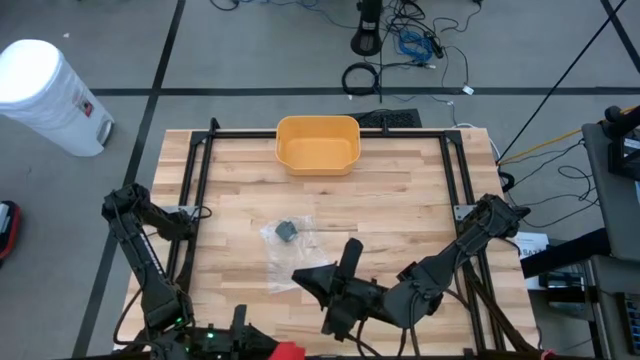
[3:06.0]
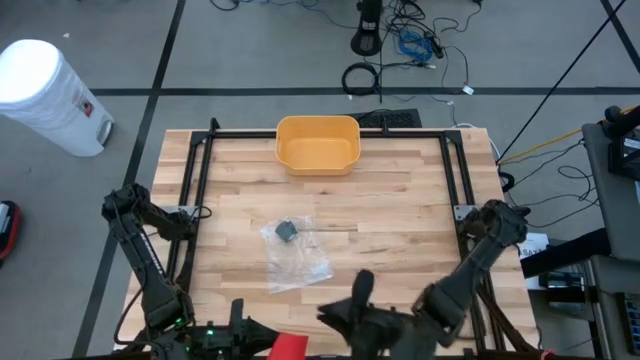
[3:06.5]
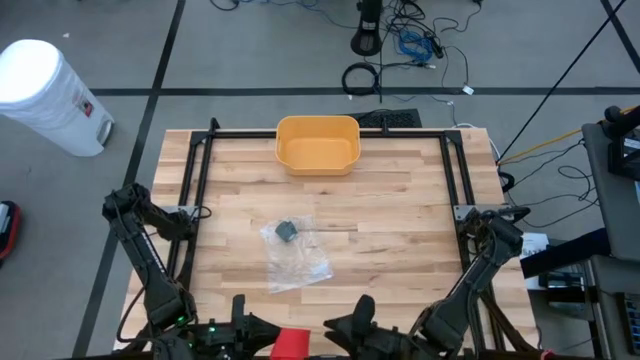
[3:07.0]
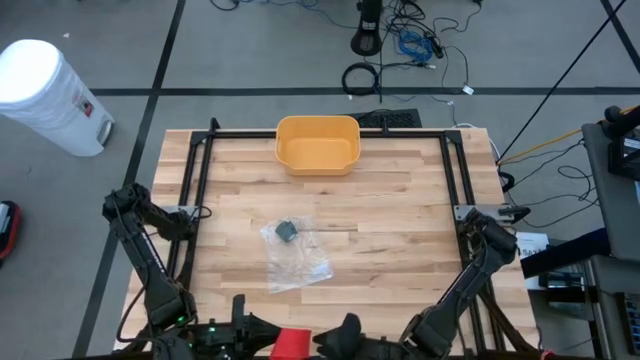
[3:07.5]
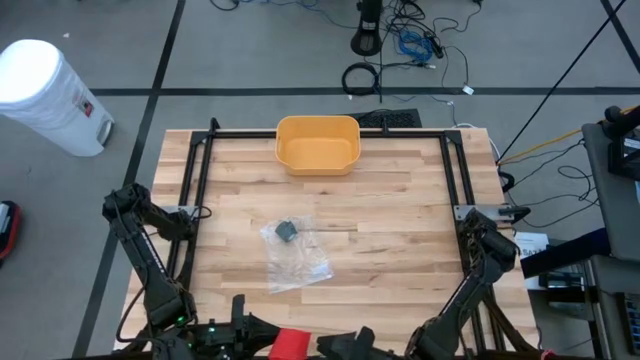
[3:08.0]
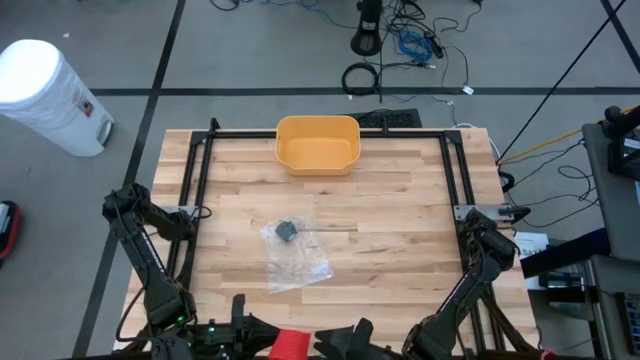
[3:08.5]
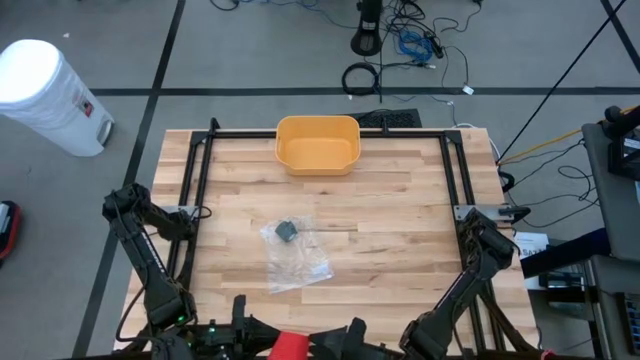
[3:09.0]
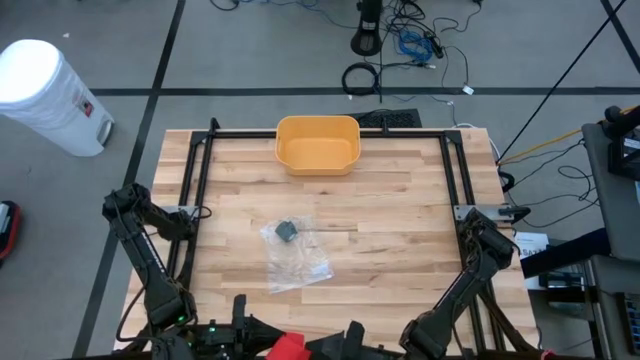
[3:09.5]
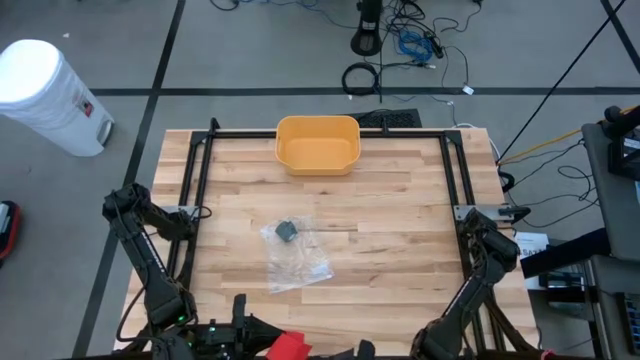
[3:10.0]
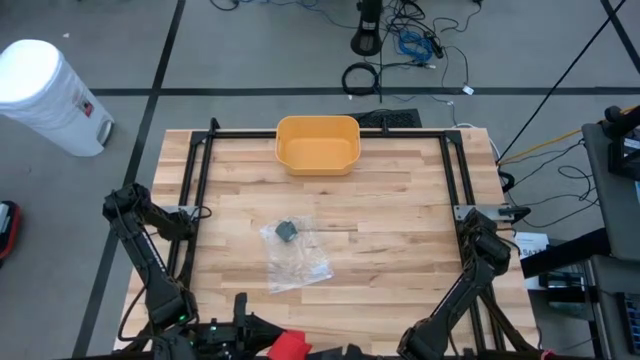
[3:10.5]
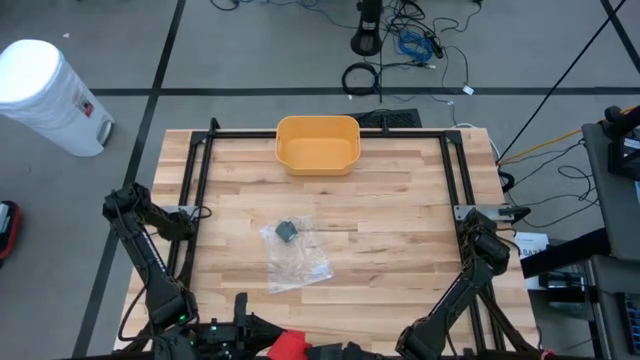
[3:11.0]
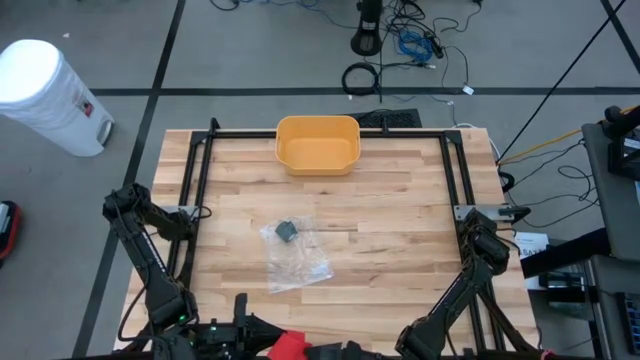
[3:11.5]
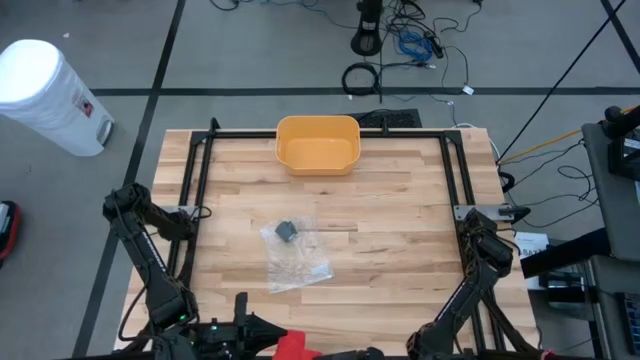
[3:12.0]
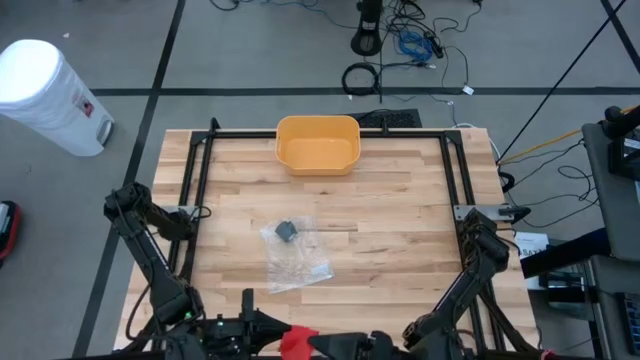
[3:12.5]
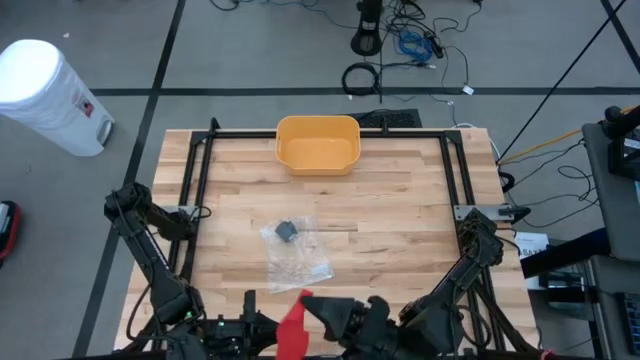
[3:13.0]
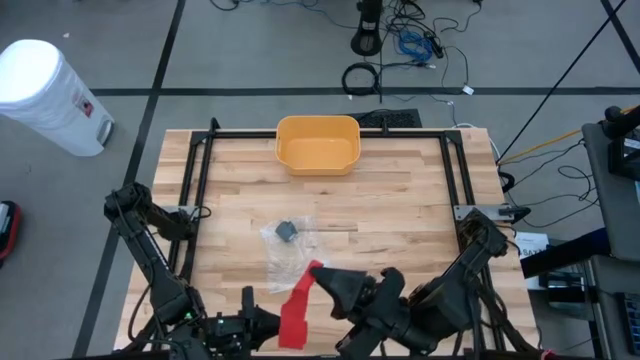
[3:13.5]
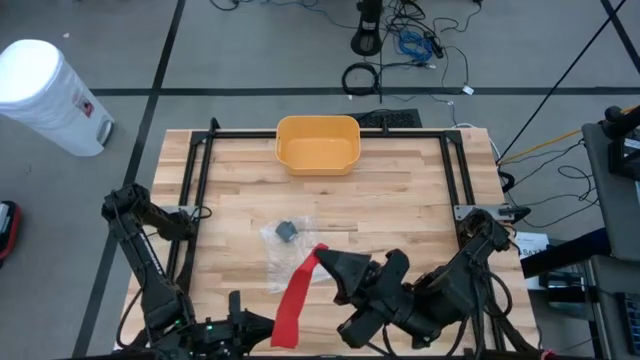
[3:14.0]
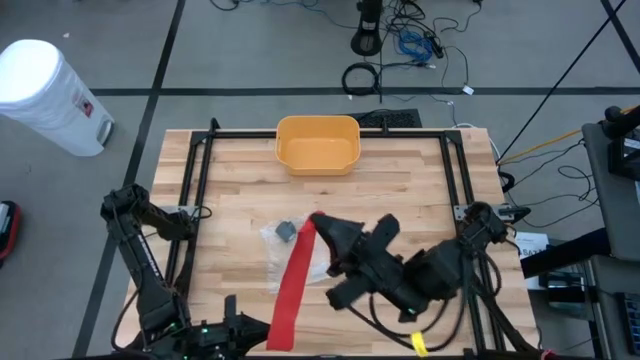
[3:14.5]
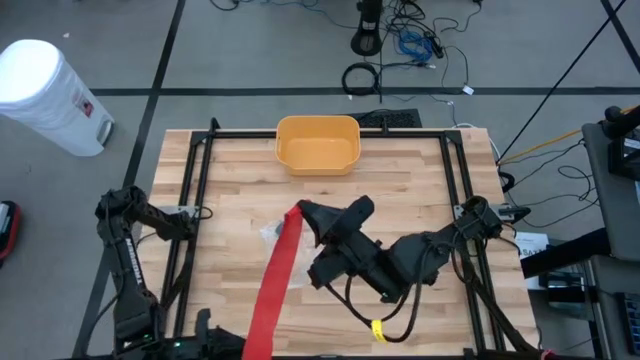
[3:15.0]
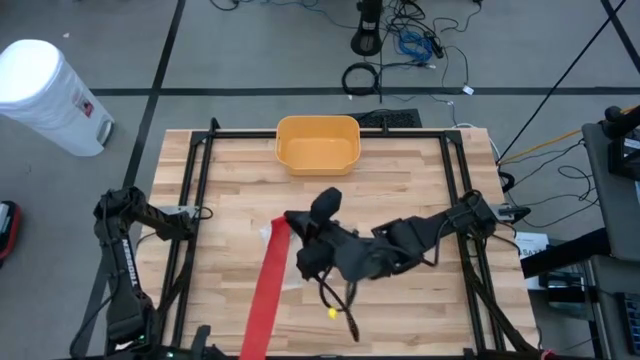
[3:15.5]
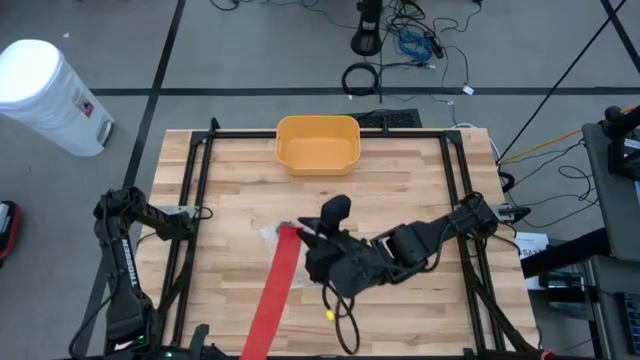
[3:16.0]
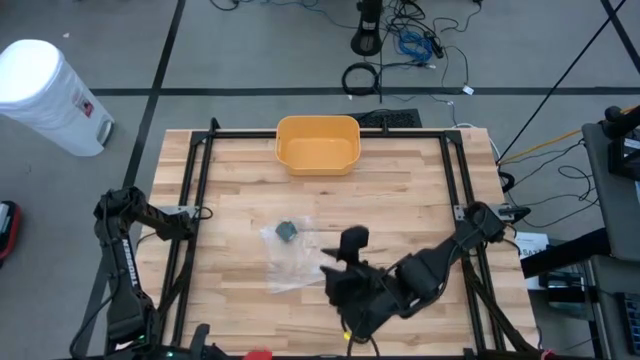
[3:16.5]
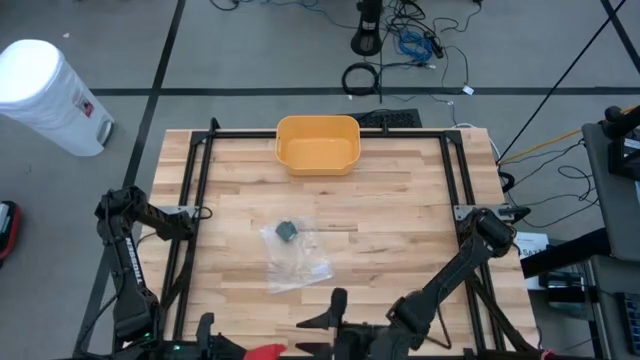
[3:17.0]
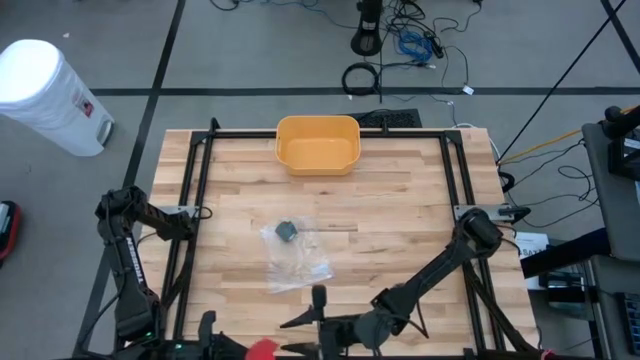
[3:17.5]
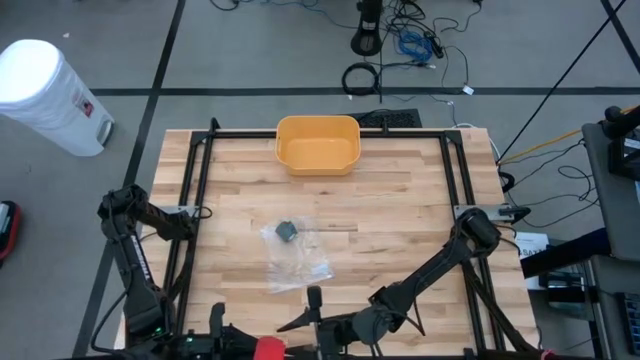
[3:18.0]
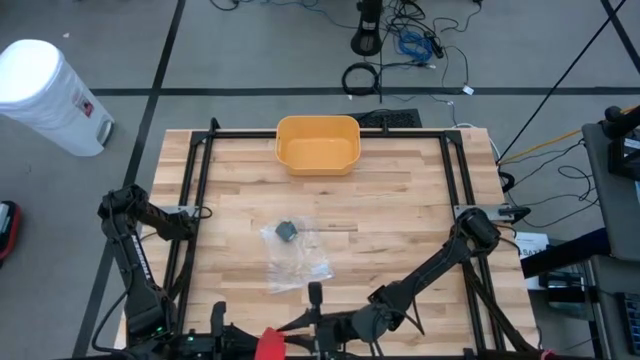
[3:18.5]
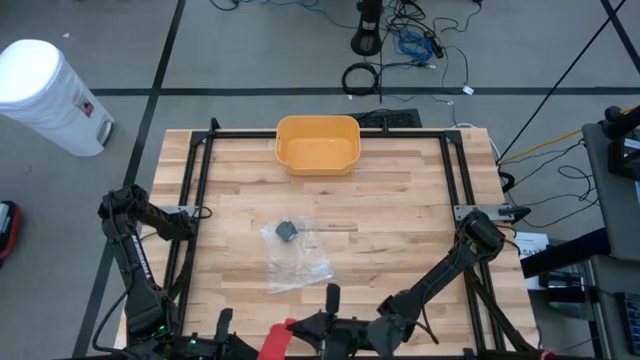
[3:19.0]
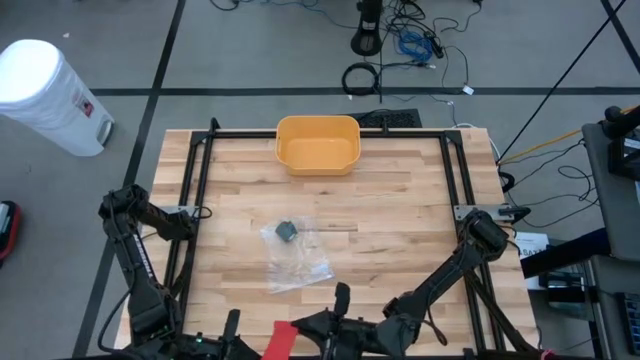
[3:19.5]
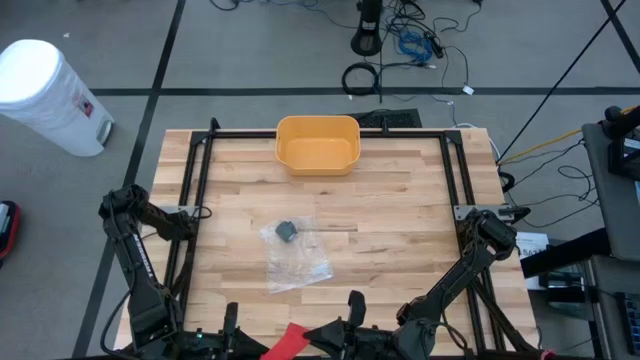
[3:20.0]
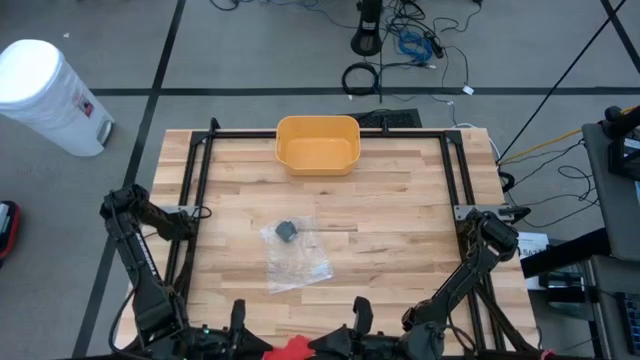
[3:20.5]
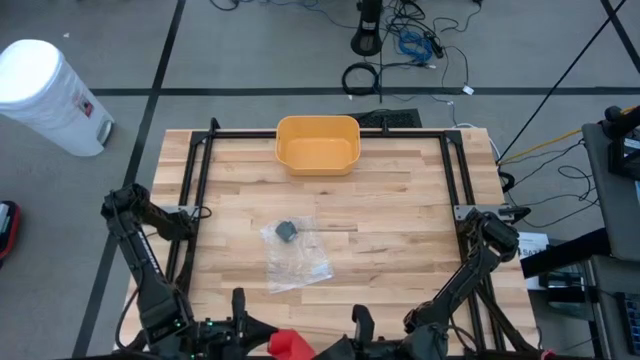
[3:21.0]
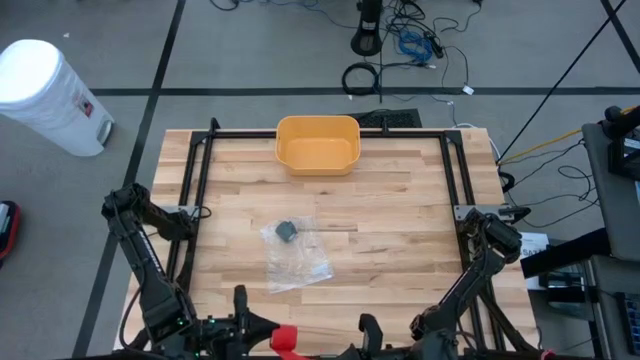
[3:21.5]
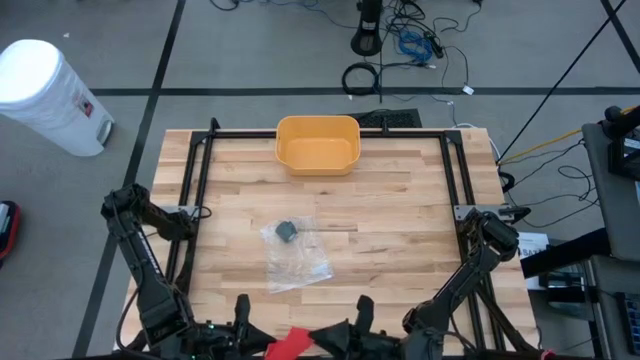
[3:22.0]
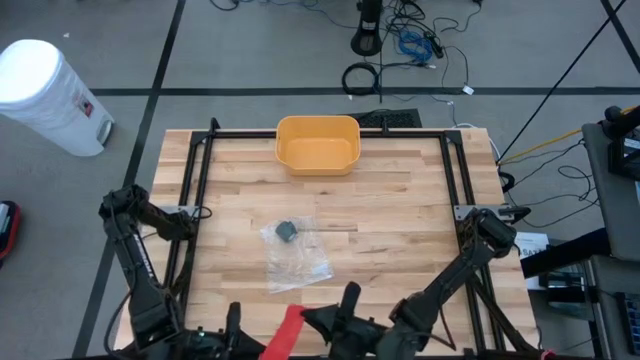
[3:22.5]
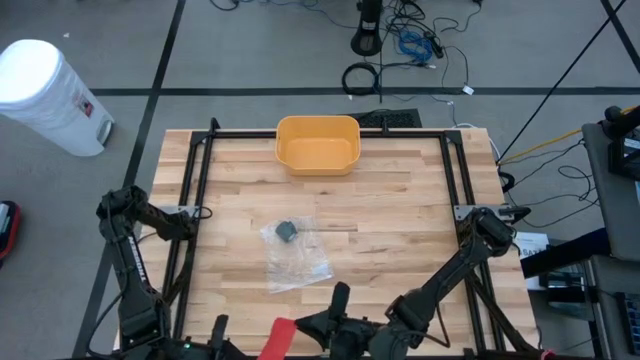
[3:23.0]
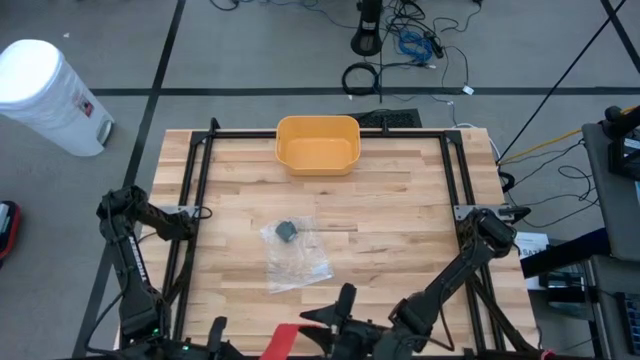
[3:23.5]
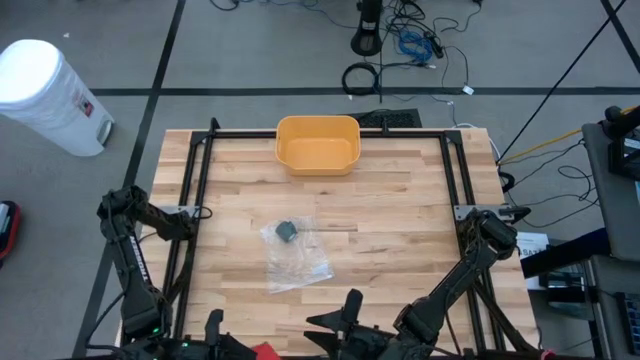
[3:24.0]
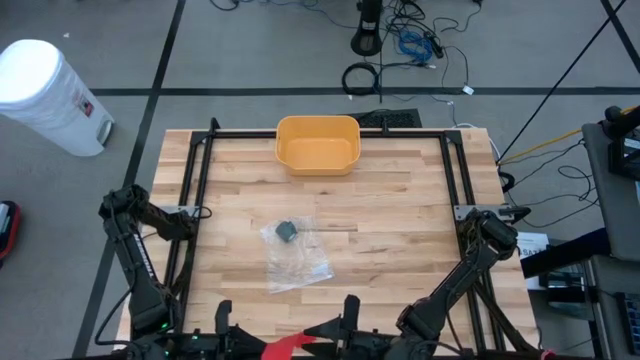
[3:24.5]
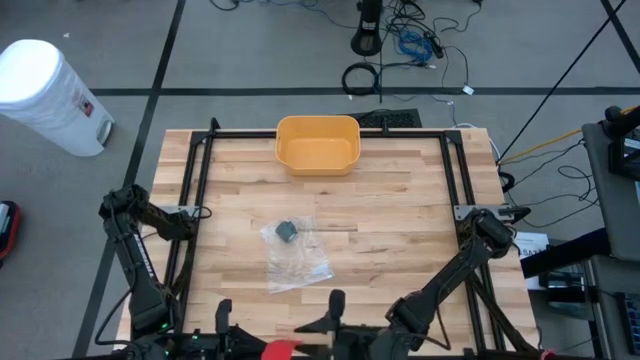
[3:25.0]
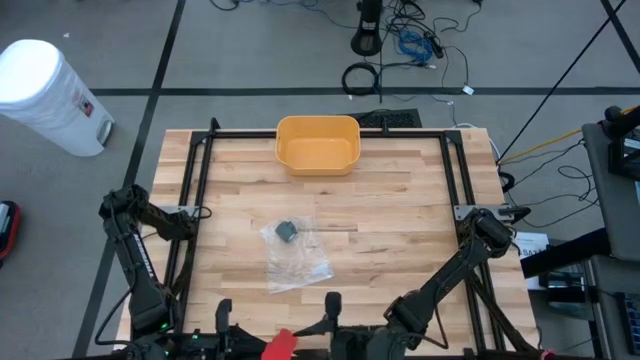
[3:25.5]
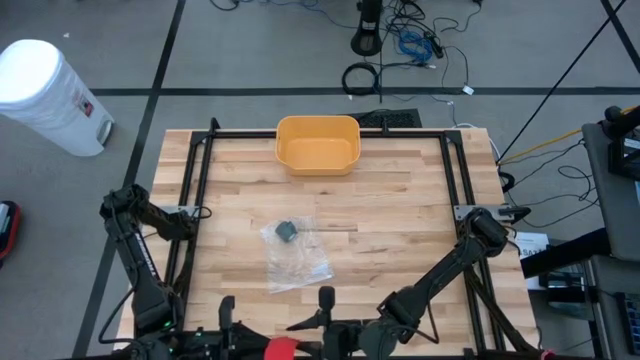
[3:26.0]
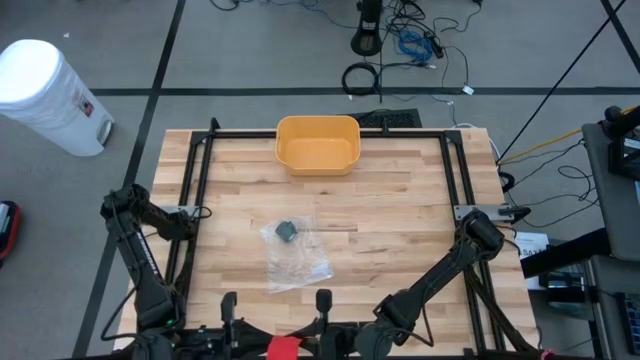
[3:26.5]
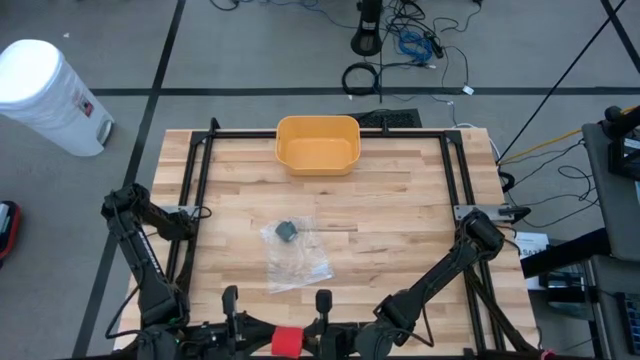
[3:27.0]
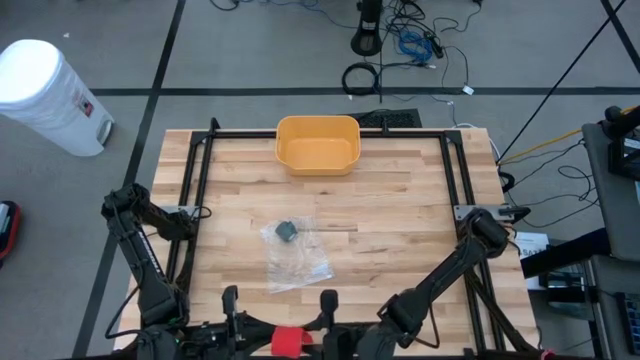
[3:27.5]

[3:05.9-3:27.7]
Task: Roll bandage
Roll the red bandage
